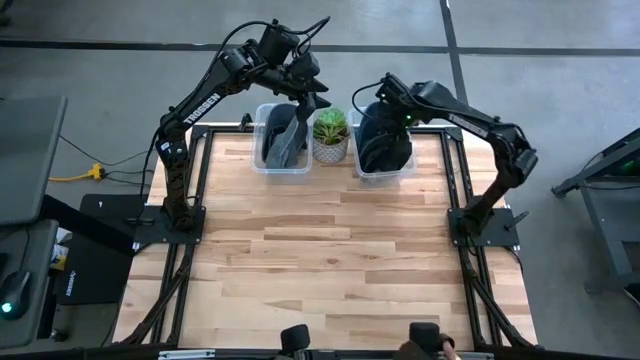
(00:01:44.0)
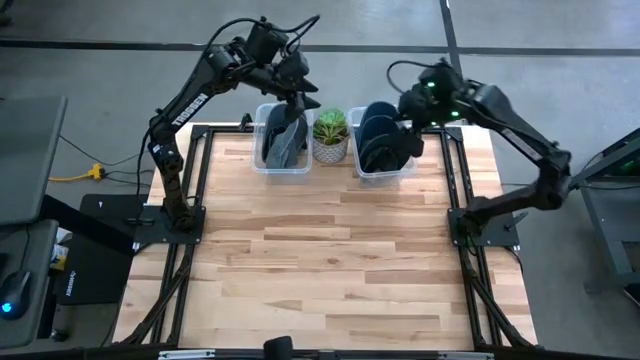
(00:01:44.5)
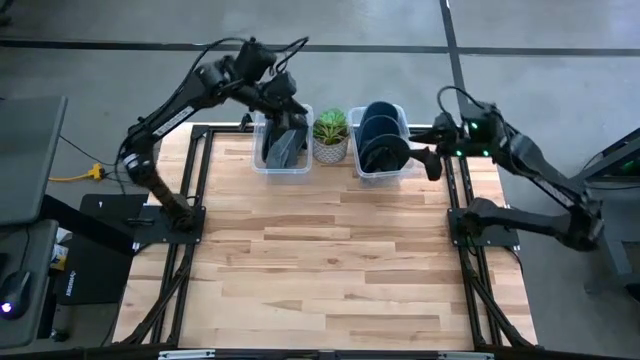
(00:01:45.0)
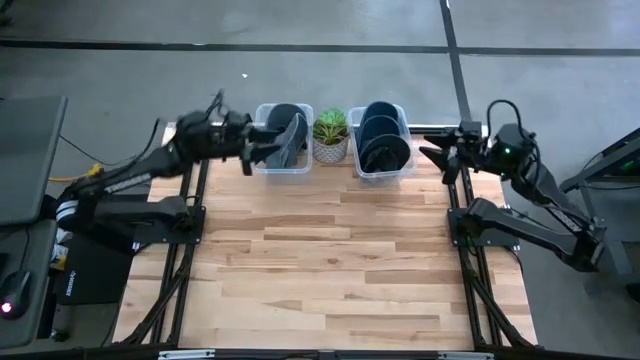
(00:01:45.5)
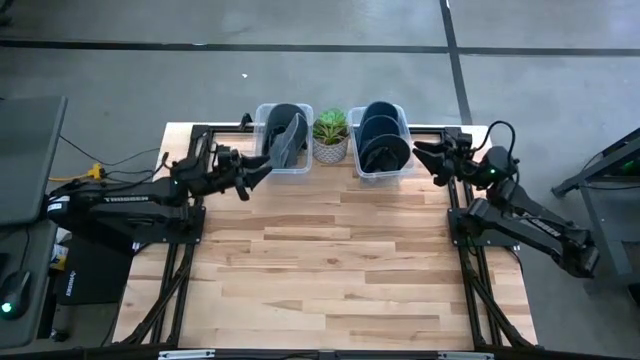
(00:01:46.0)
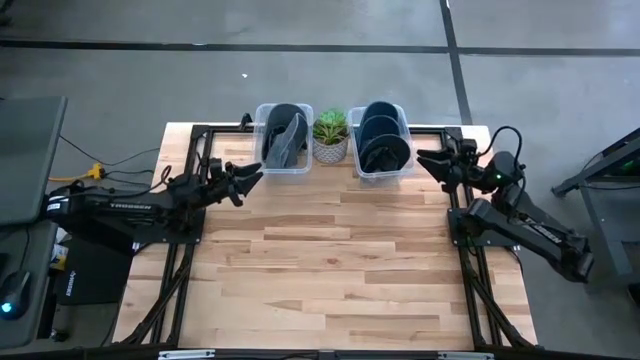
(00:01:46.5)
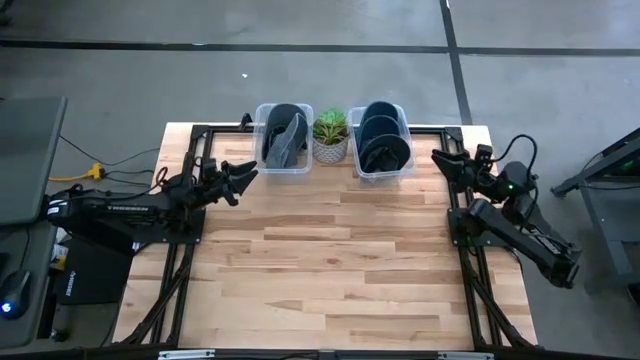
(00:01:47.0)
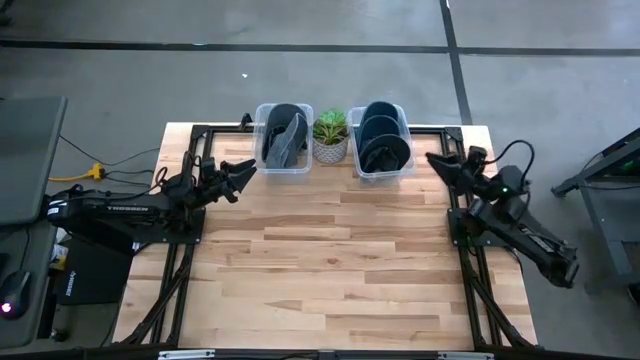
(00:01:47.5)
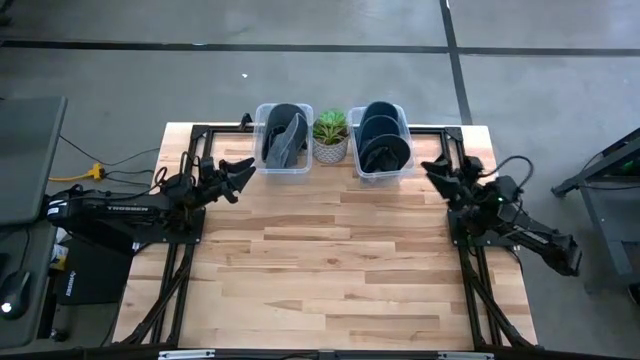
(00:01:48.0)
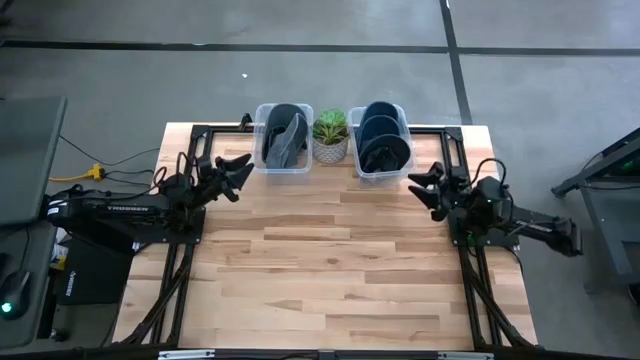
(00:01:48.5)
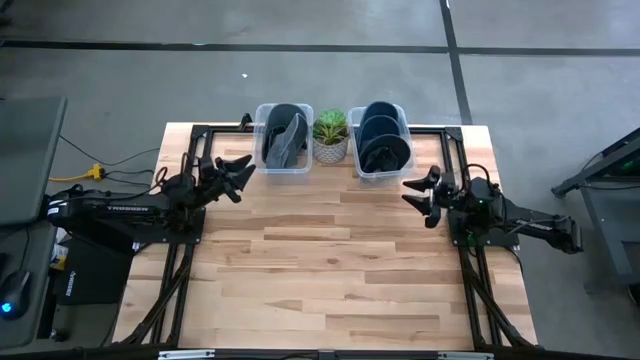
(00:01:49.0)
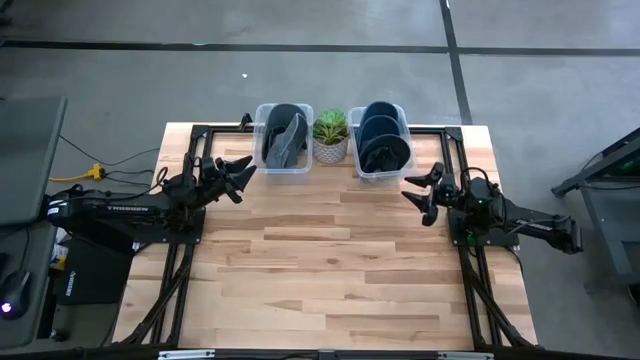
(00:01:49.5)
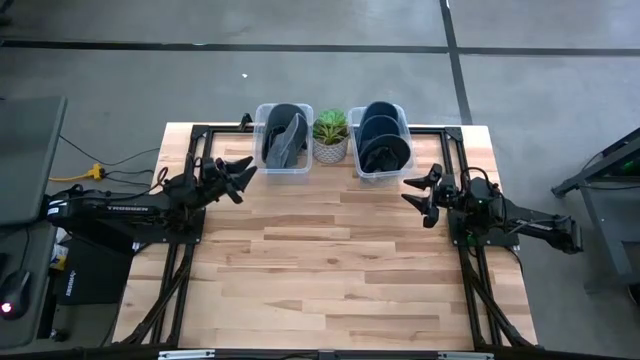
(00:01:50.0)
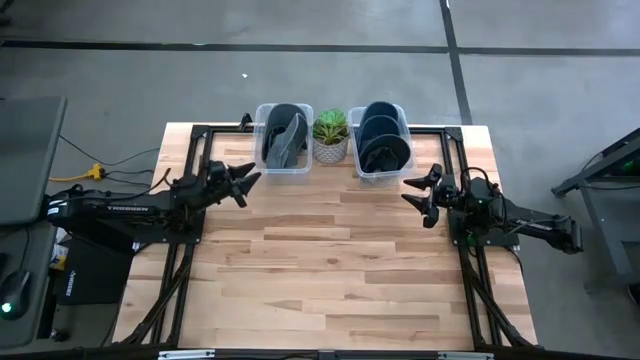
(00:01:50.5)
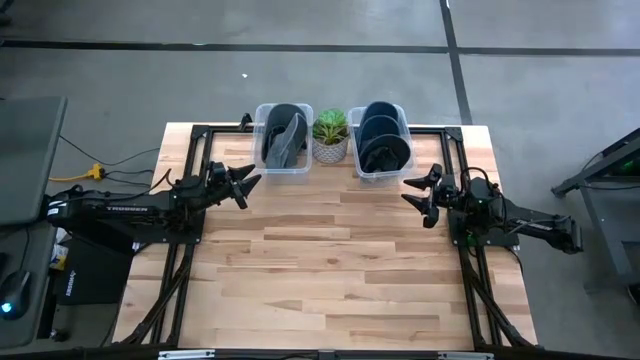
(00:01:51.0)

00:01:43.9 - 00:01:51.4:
Task: Pick & Place hat
Return to Home Position

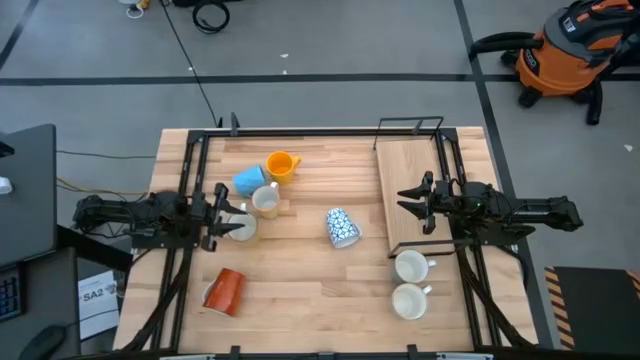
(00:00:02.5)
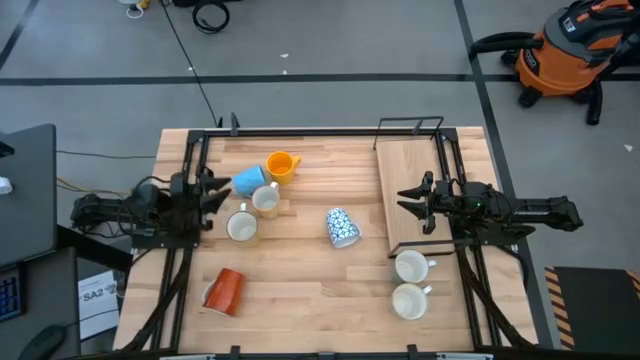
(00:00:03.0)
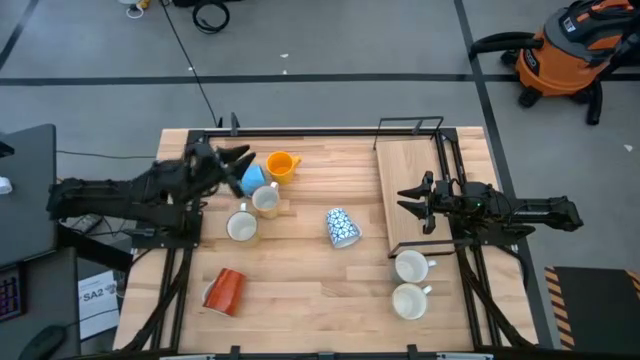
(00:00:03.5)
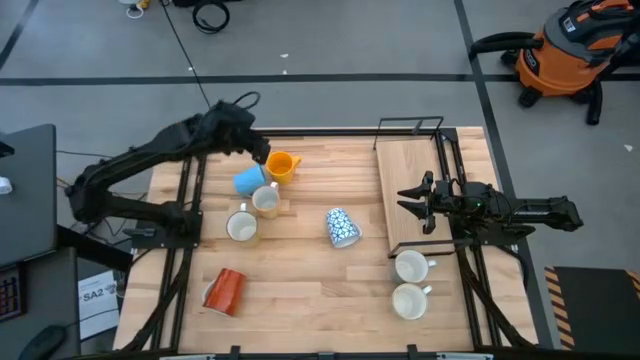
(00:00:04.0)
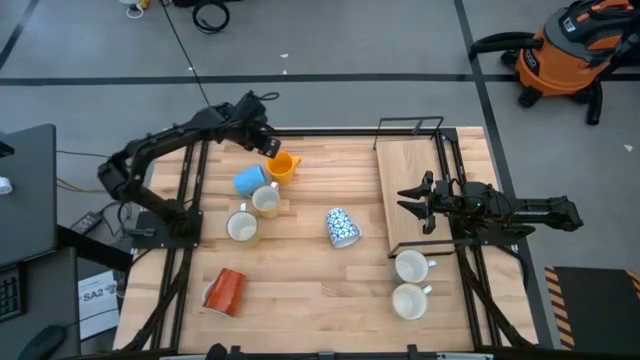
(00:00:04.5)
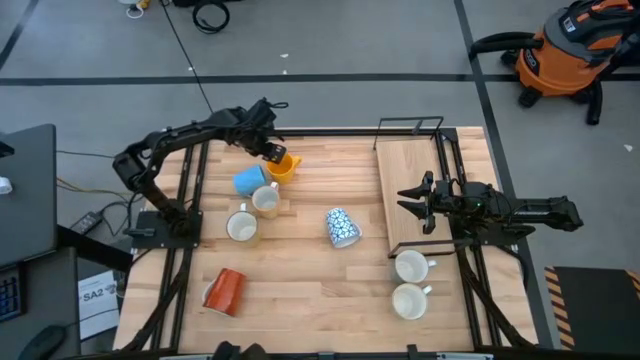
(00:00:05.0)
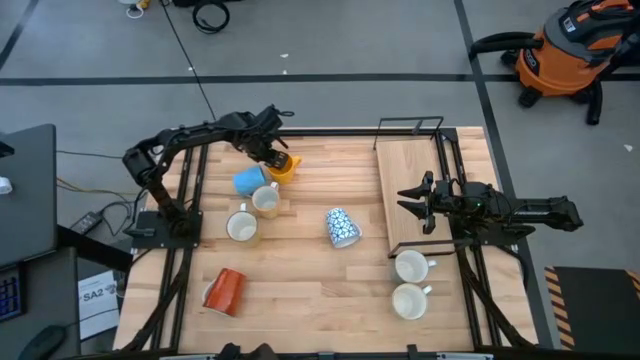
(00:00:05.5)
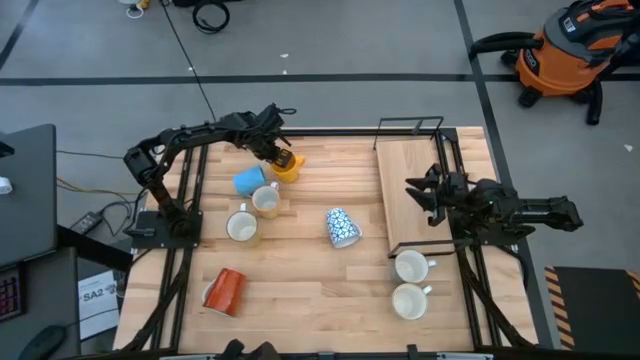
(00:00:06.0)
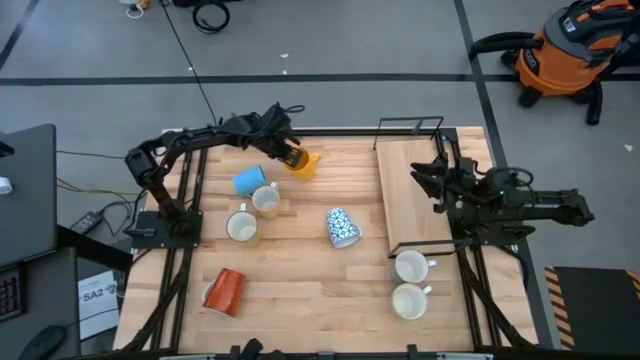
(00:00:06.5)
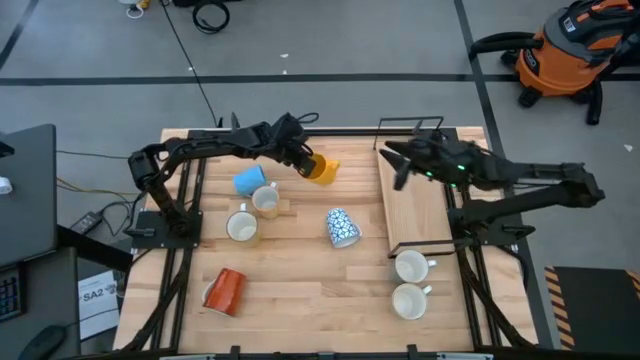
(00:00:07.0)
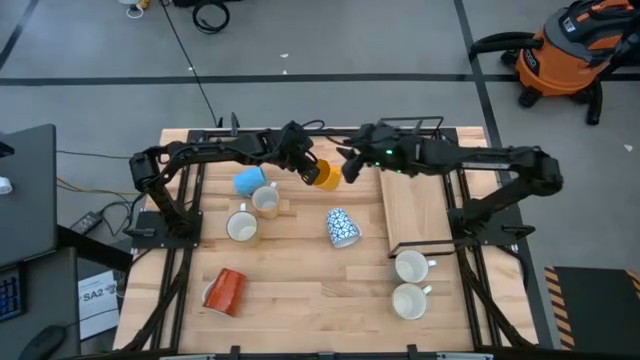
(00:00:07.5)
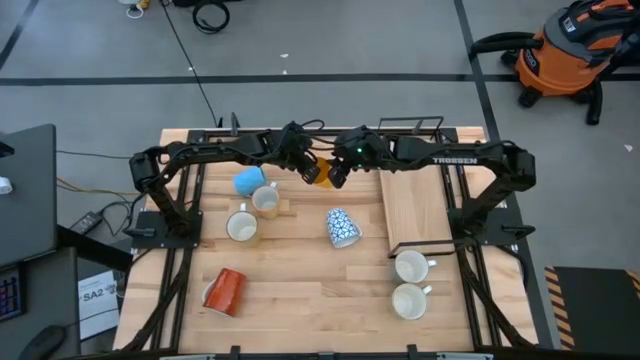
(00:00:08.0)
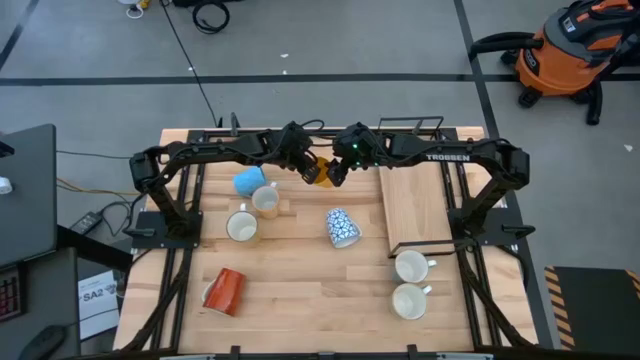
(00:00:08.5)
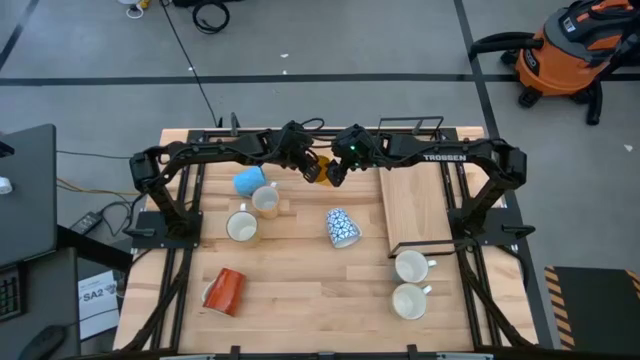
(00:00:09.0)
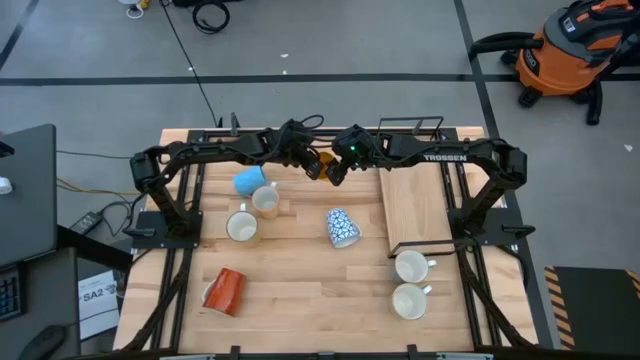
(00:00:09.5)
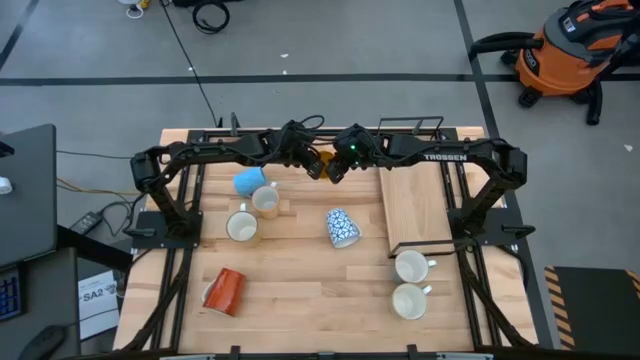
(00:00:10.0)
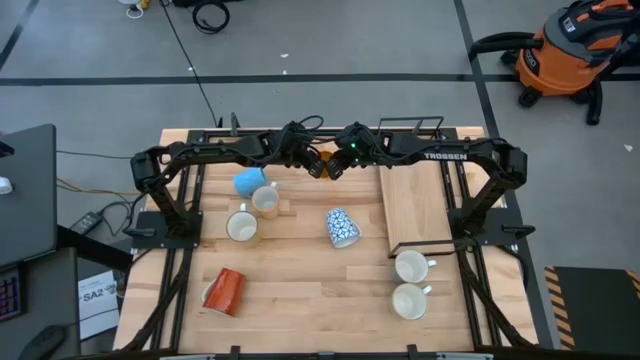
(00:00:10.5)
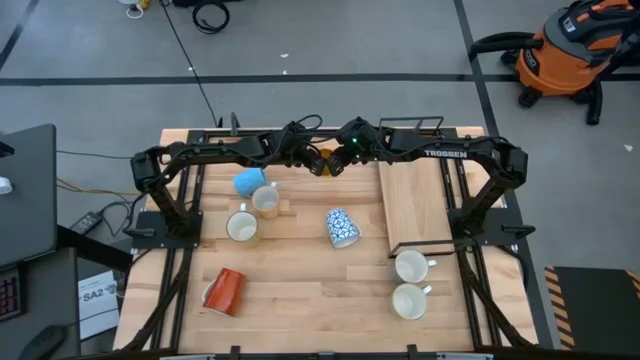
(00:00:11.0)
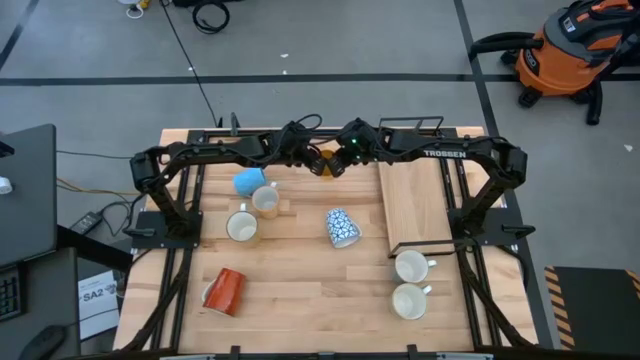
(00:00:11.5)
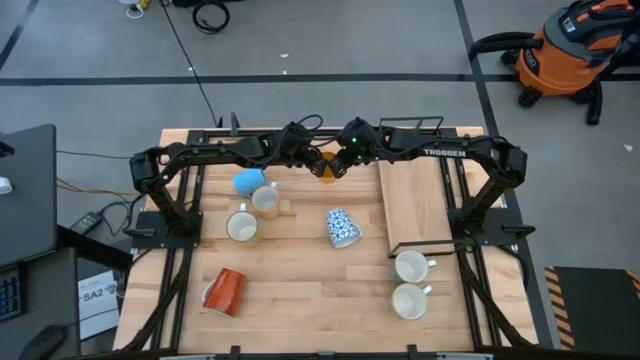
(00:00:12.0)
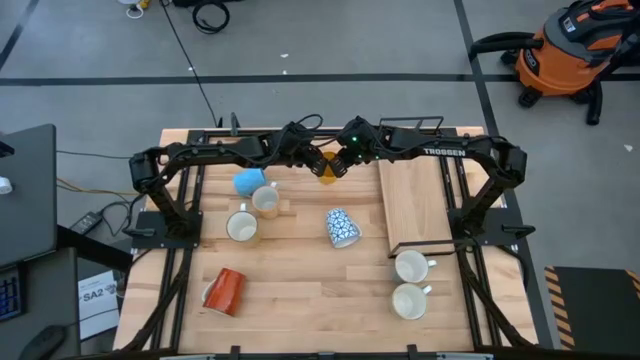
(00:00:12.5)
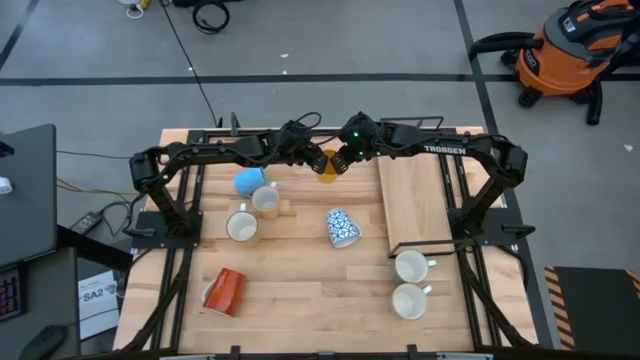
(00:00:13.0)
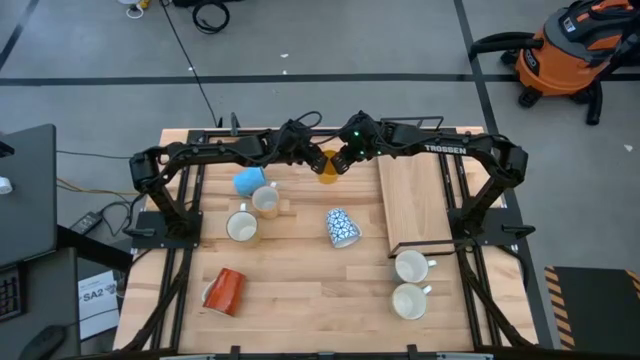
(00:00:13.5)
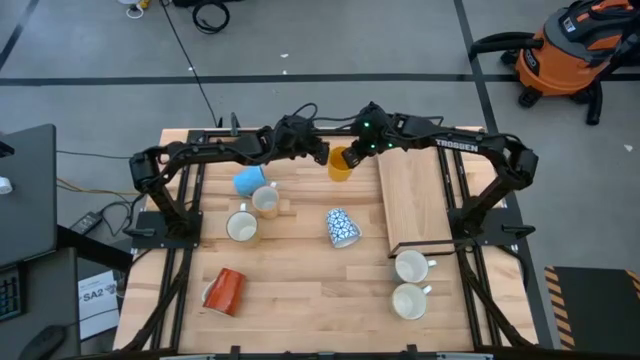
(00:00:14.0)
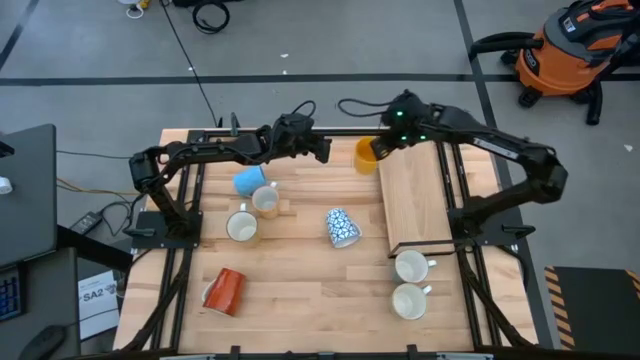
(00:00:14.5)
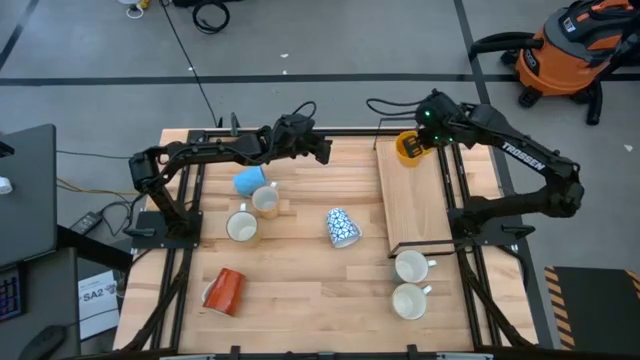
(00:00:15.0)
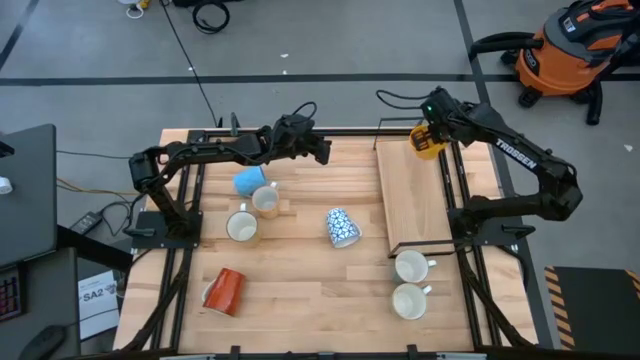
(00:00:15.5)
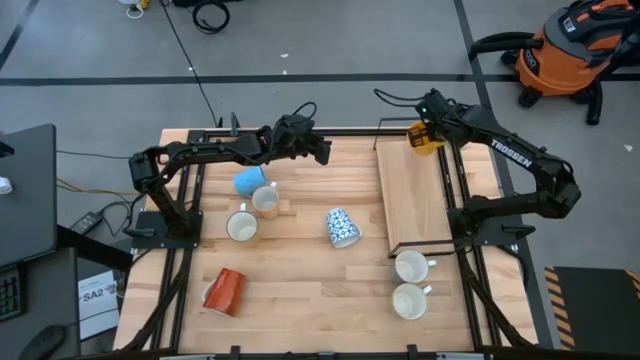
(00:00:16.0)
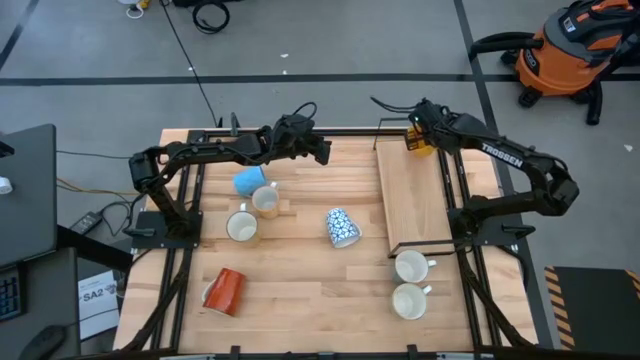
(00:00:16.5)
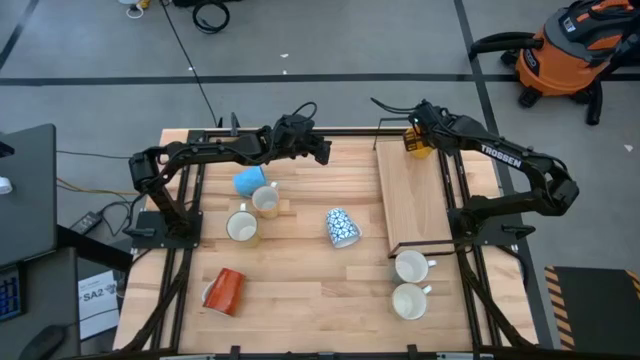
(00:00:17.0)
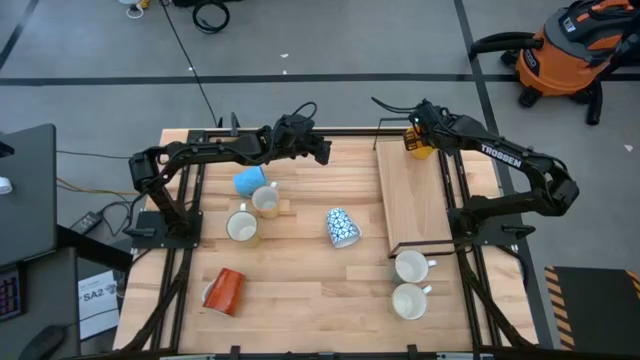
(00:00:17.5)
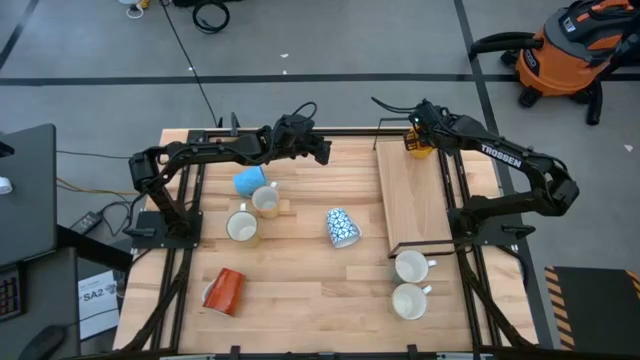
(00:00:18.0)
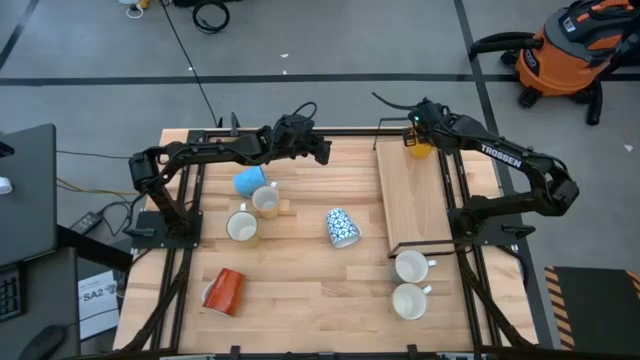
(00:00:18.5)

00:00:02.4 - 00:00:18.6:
Task: Place coffee mugs
Put the yellow mug on the shelf
